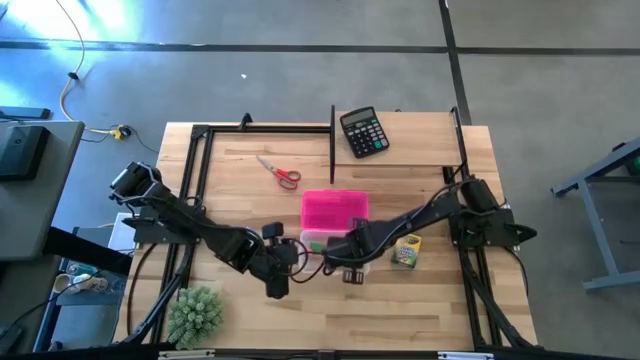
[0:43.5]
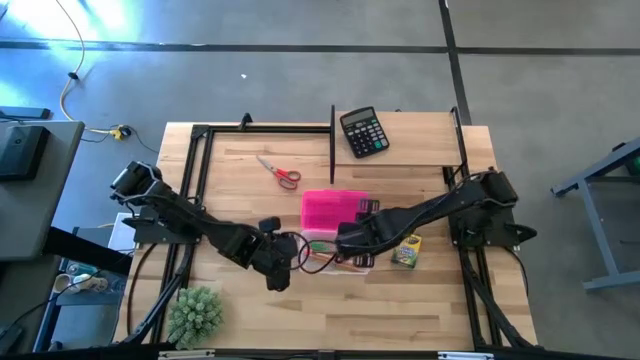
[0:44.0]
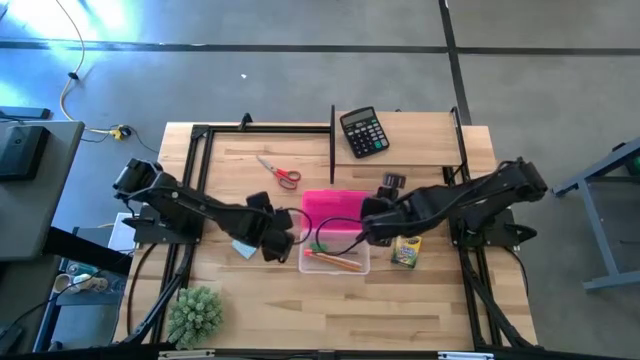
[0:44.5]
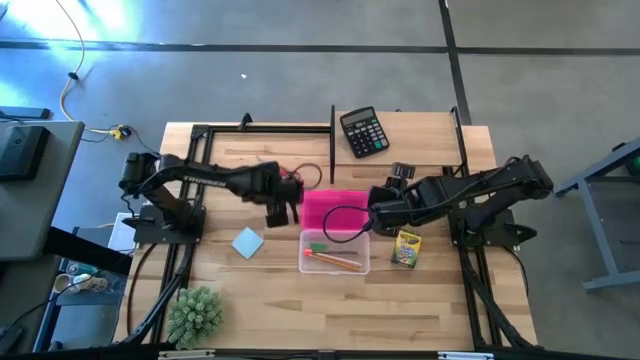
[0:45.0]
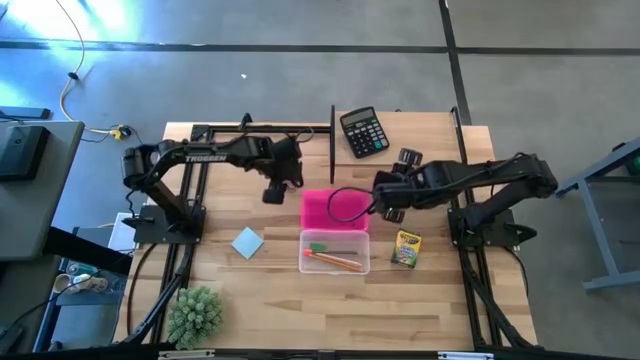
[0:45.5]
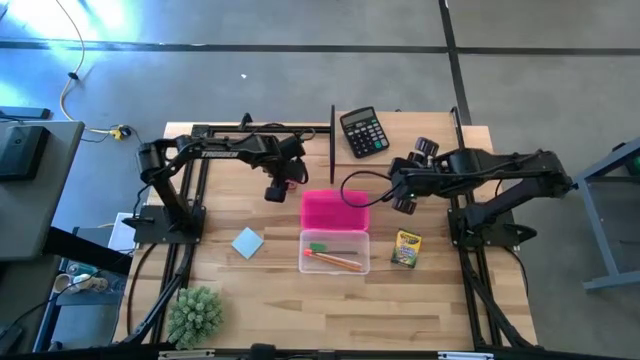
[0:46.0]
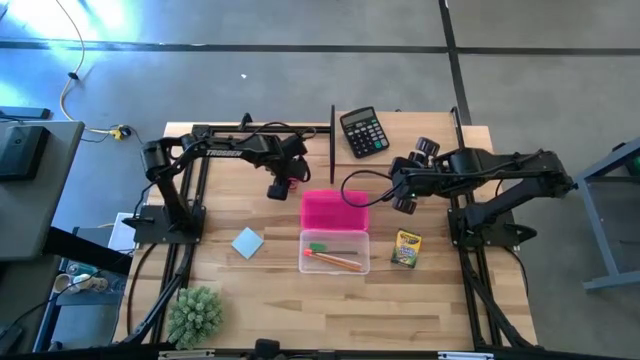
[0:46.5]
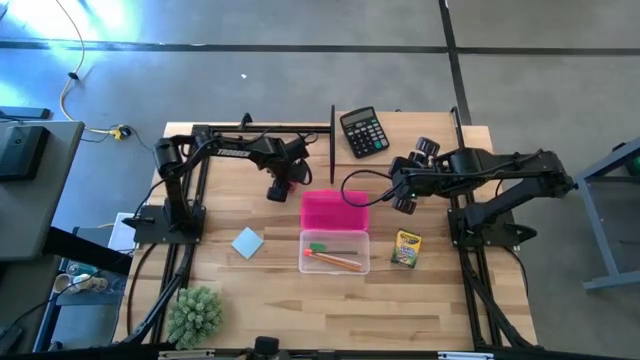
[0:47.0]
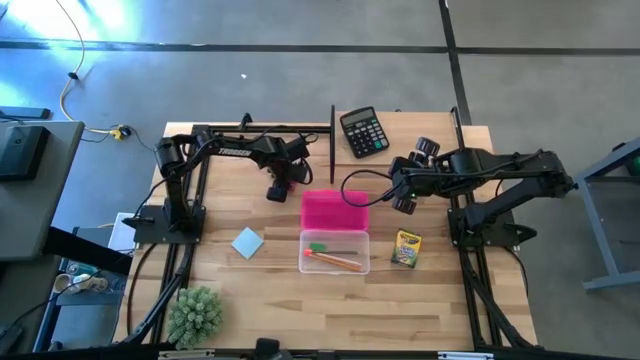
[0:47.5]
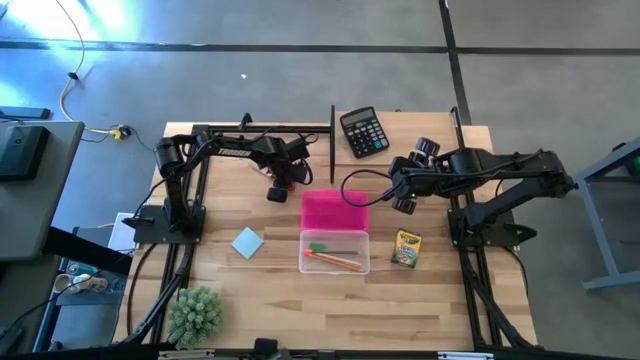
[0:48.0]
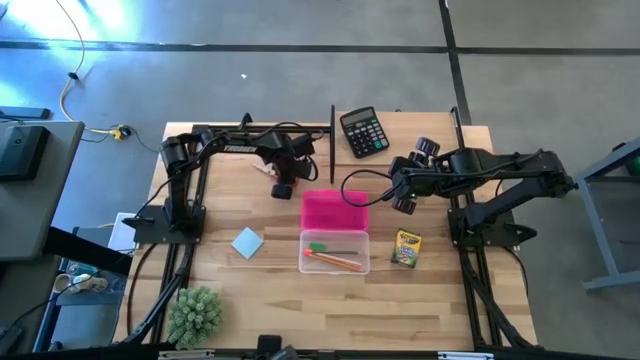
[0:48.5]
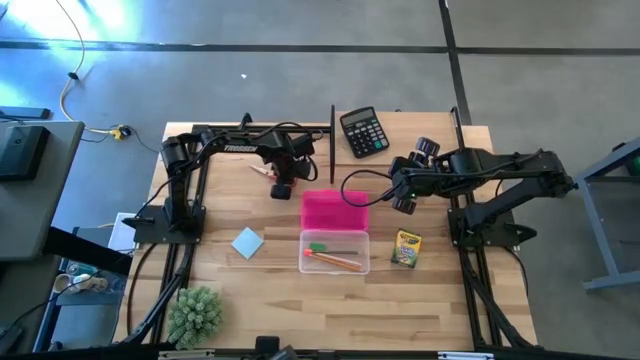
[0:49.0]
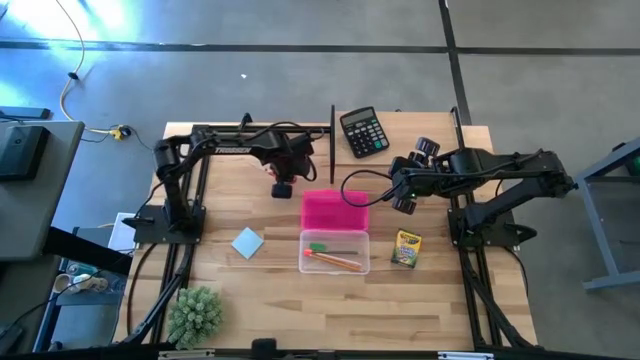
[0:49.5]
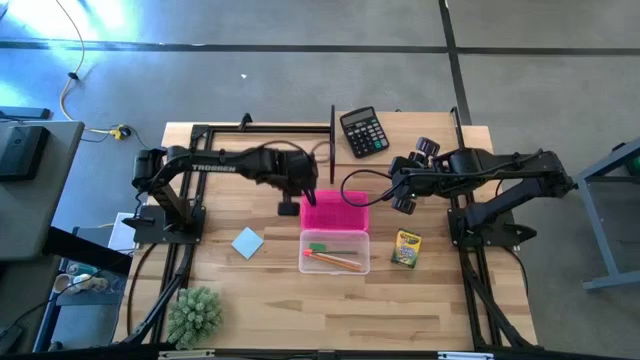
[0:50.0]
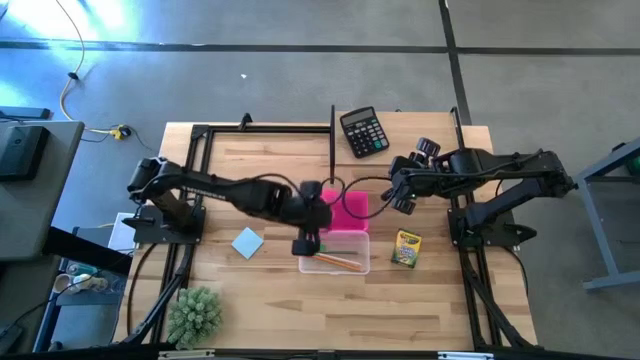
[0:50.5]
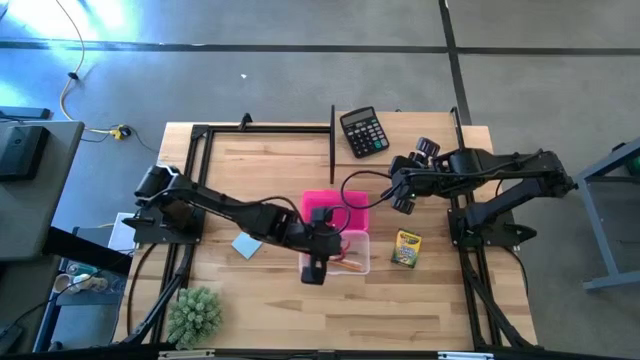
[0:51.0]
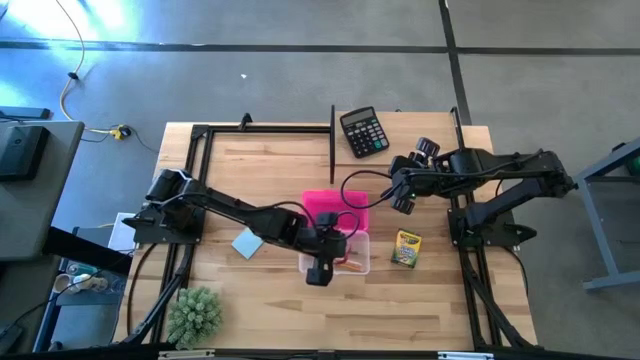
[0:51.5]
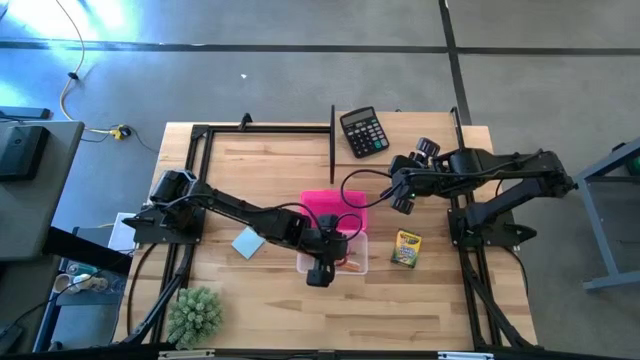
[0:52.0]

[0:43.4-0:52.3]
Task: Pack school essentials
Put the red scissors into the pink supply box

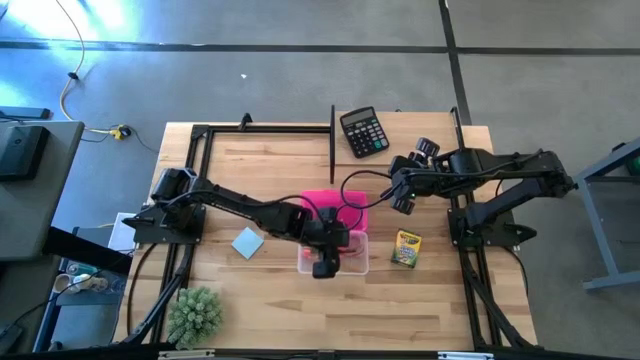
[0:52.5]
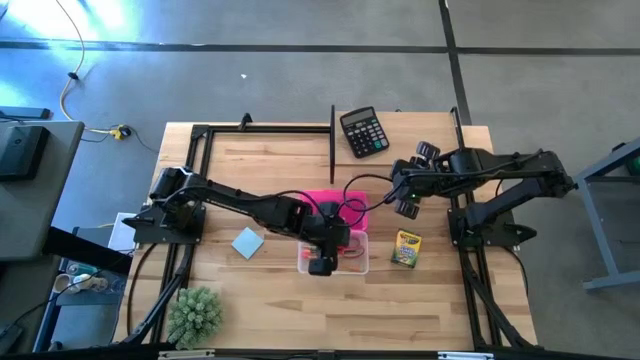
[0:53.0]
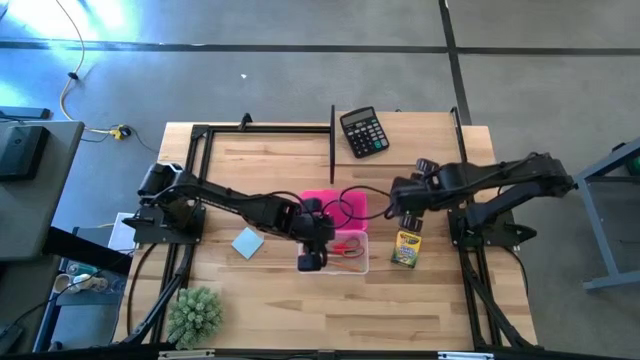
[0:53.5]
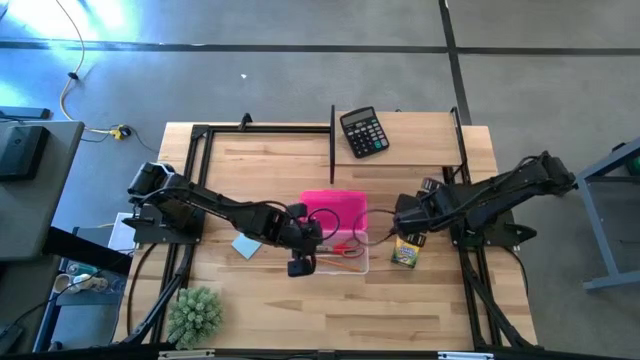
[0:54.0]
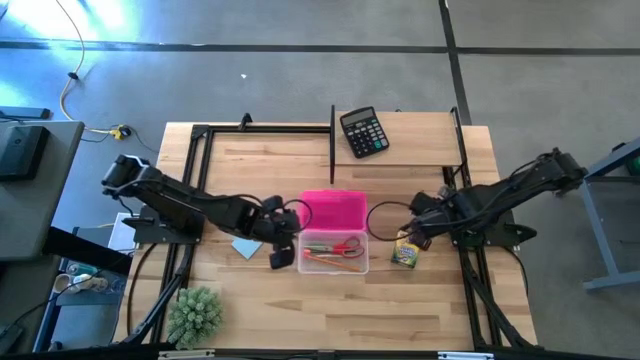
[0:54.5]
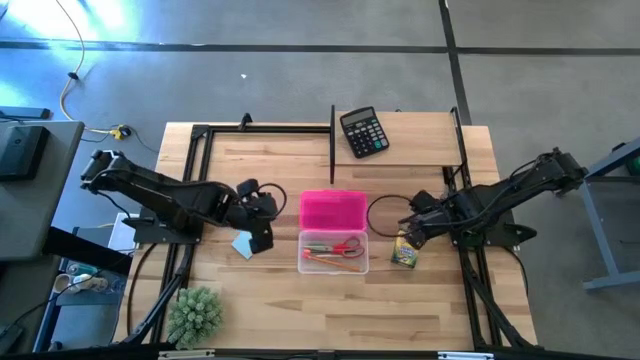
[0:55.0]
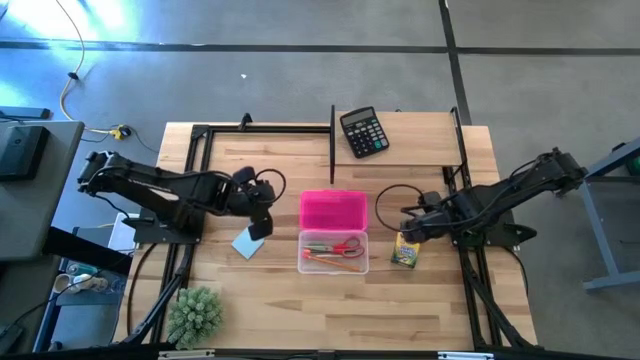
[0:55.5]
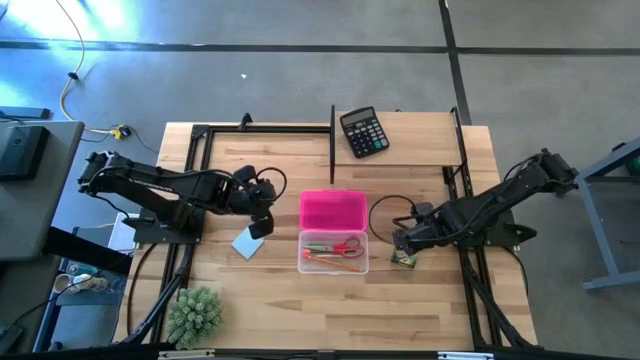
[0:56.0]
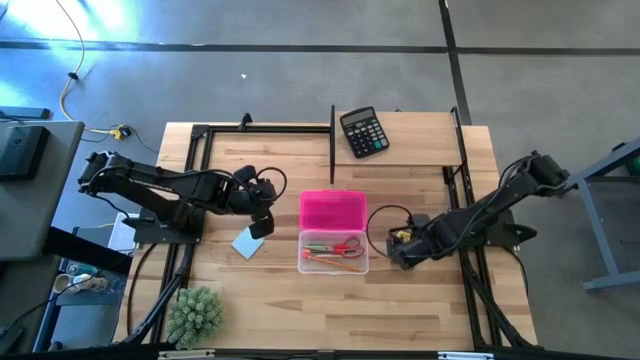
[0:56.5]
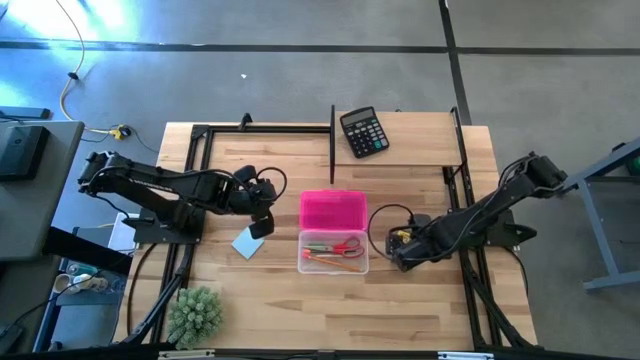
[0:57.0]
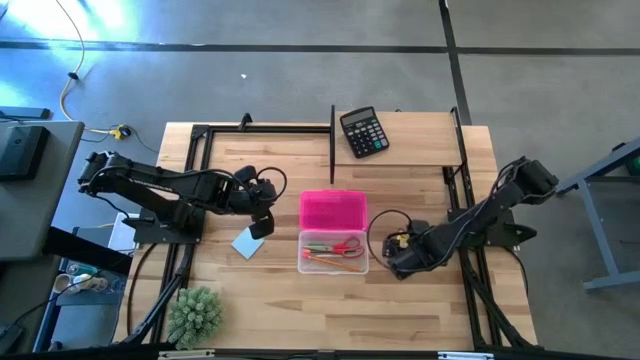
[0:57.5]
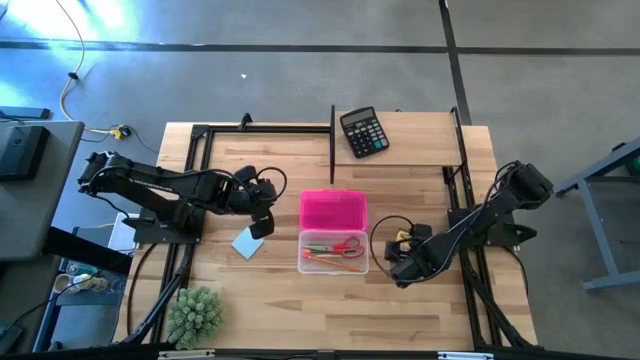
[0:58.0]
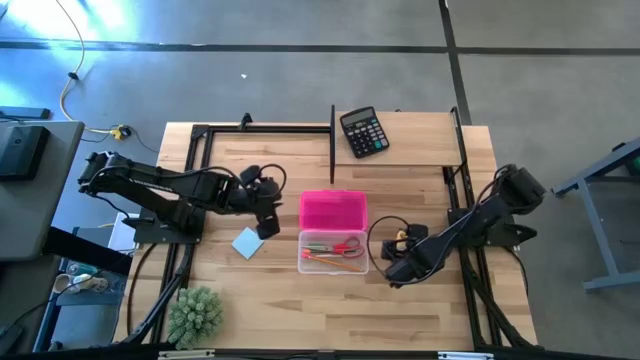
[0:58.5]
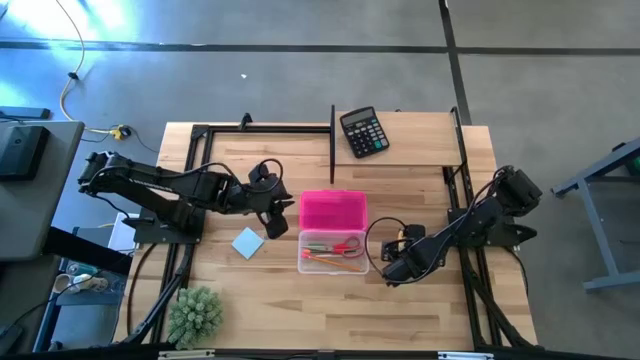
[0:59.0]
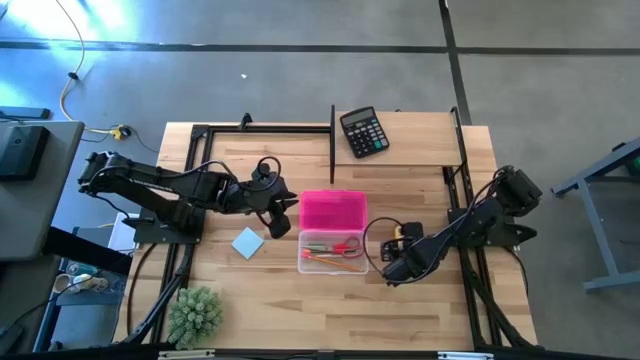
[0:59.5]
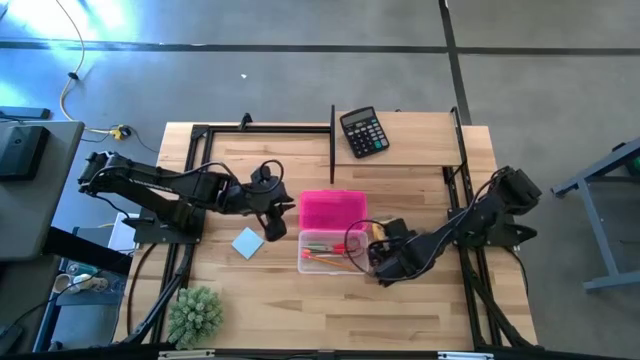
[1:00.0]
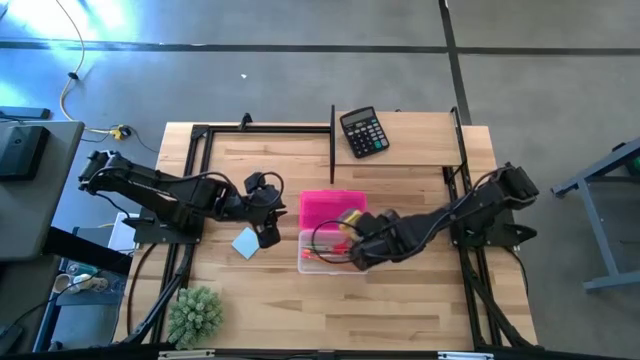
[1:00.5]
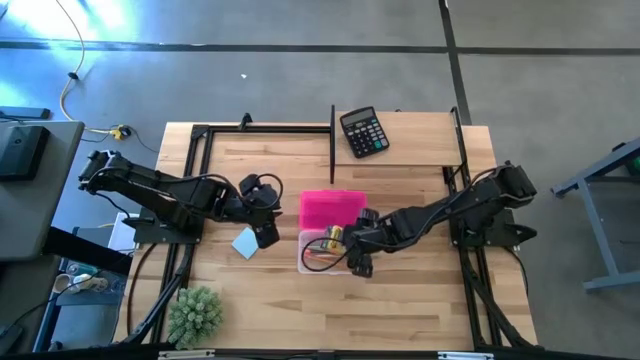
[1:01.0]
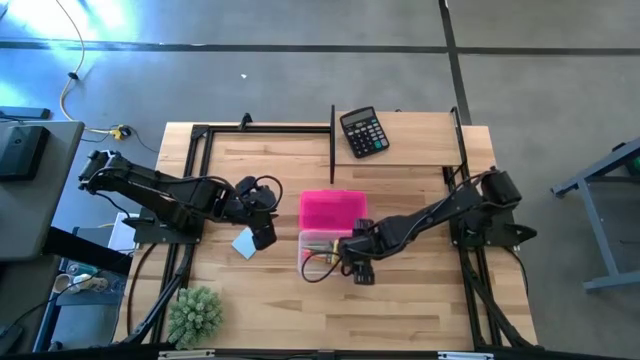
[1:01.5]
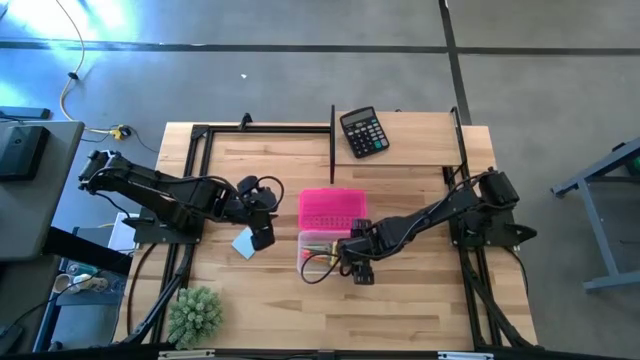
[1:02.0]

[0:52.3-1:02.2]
Put the yellow crayon box into the pink supply box

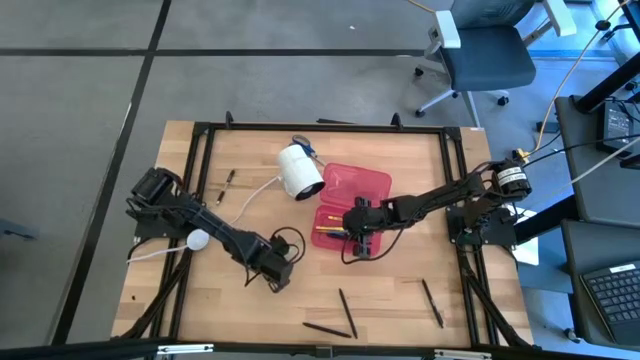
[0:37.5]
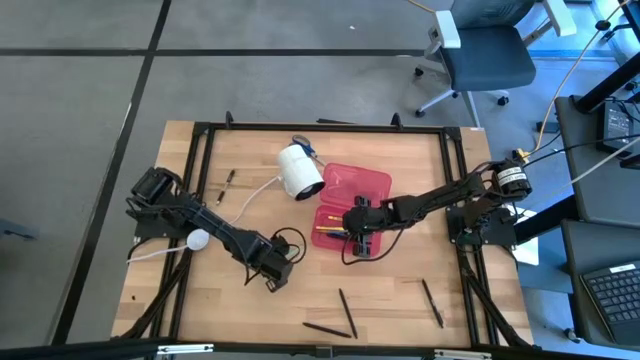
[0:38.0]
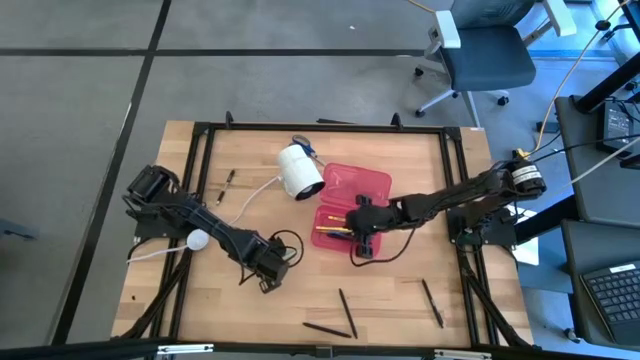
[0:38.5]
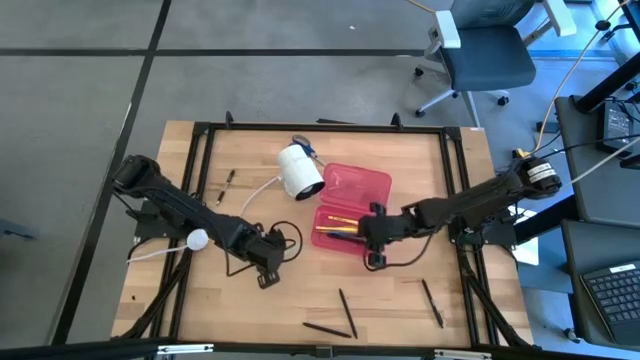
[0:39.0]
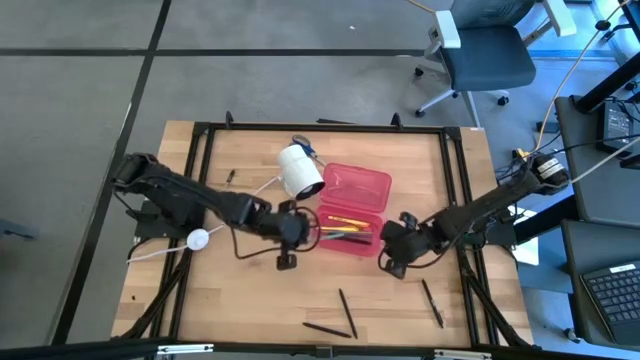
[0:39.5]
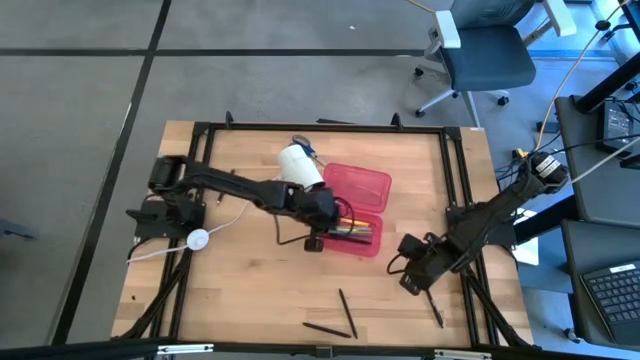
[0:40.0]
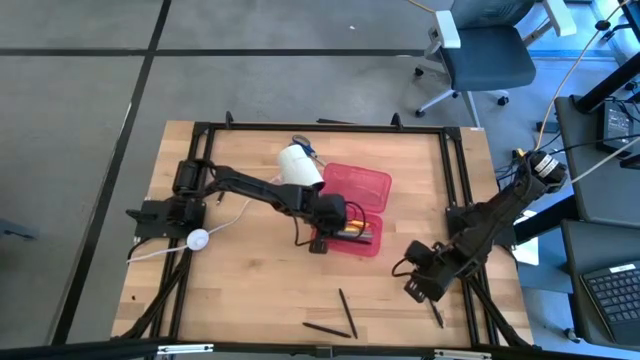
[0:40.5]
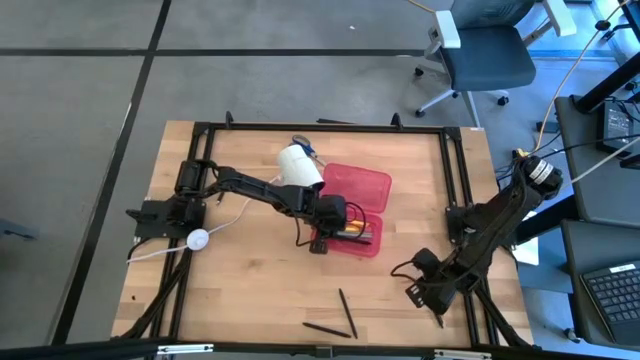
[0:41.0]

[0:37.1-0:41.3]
Task: Pick & place school supplies into a supply box
Put the blue pencil into the pink supply box
